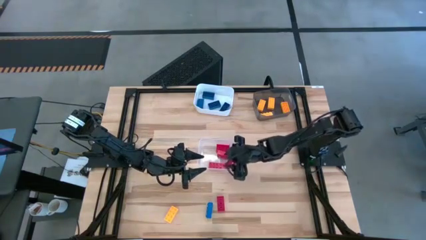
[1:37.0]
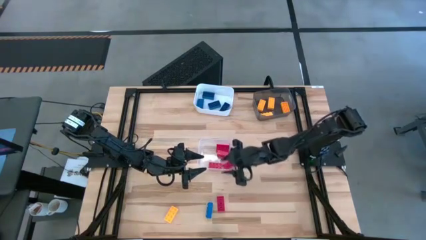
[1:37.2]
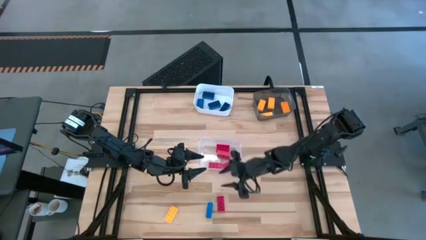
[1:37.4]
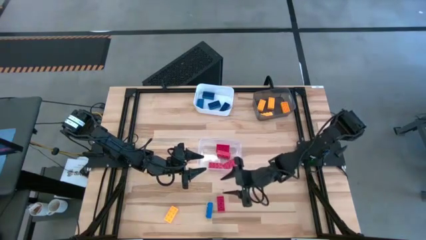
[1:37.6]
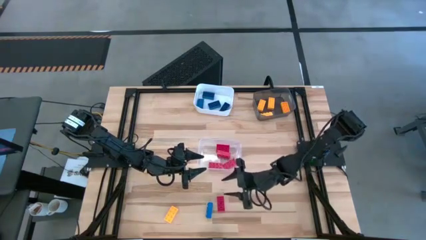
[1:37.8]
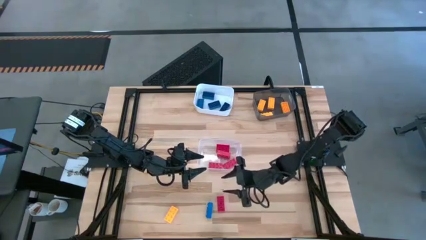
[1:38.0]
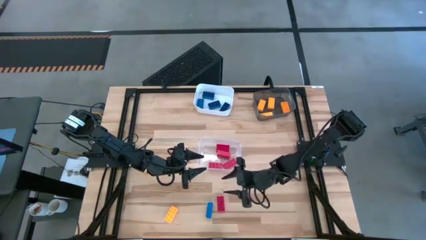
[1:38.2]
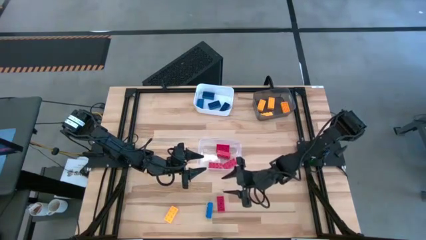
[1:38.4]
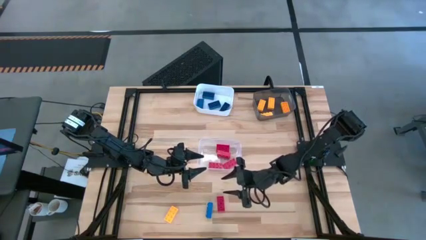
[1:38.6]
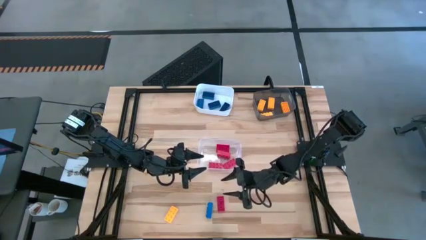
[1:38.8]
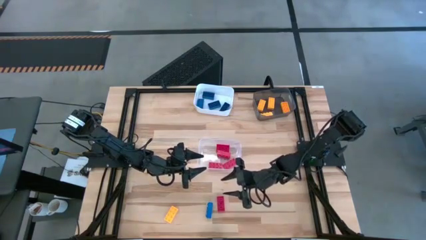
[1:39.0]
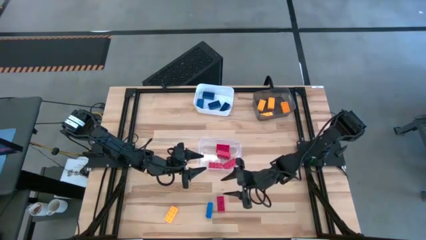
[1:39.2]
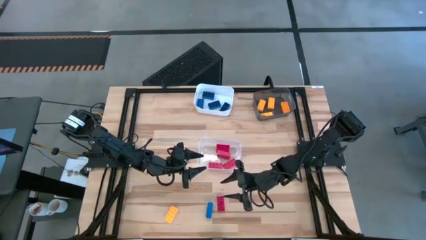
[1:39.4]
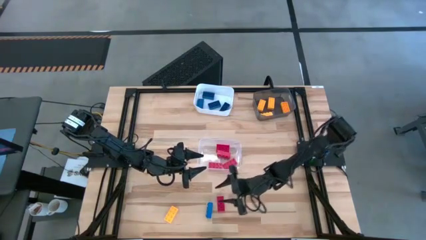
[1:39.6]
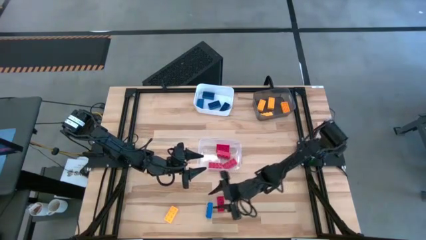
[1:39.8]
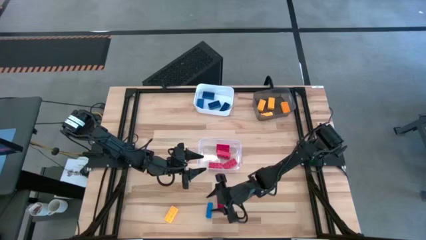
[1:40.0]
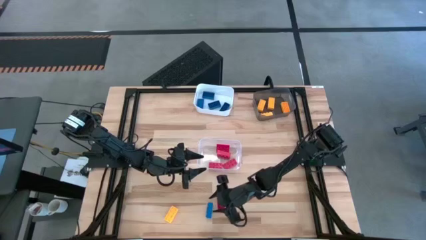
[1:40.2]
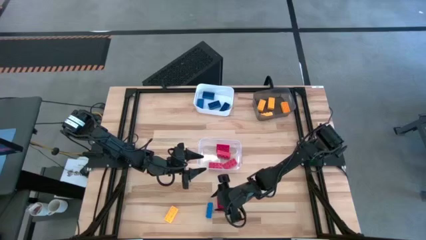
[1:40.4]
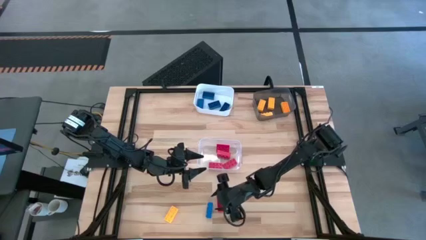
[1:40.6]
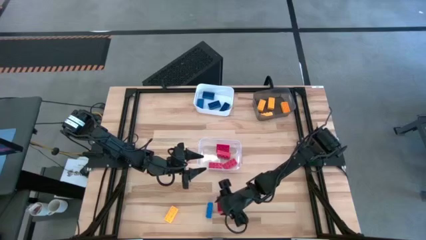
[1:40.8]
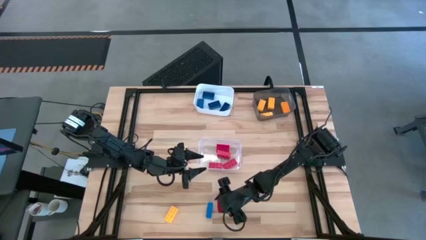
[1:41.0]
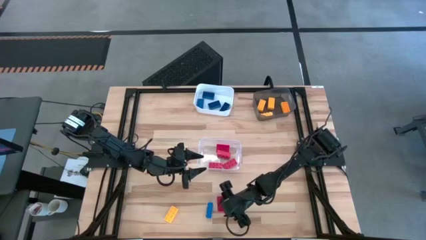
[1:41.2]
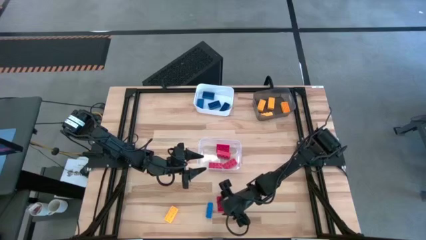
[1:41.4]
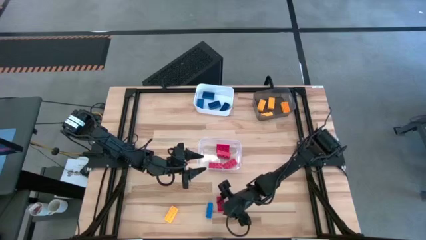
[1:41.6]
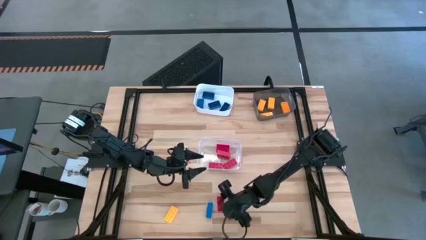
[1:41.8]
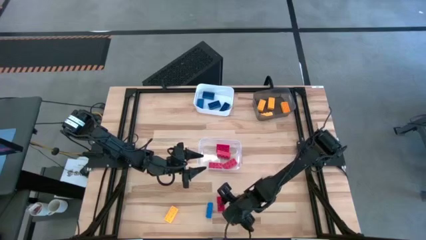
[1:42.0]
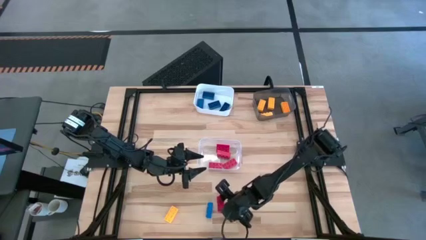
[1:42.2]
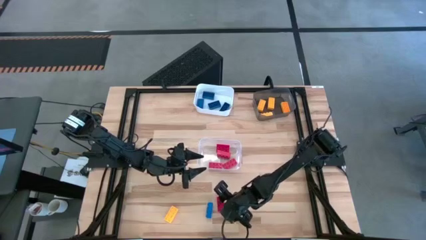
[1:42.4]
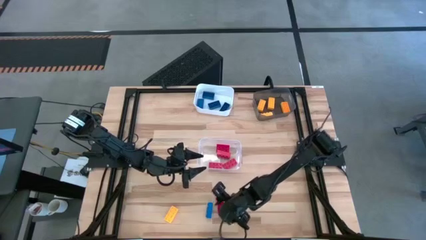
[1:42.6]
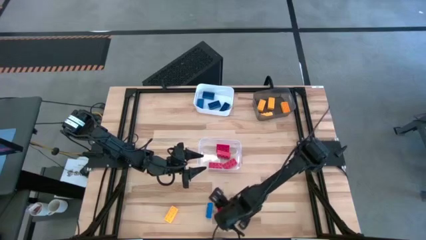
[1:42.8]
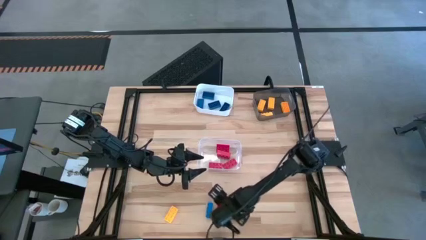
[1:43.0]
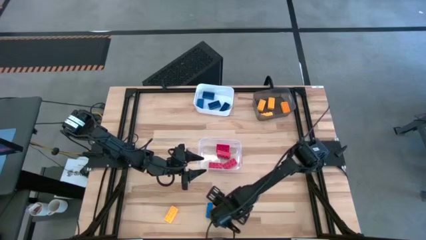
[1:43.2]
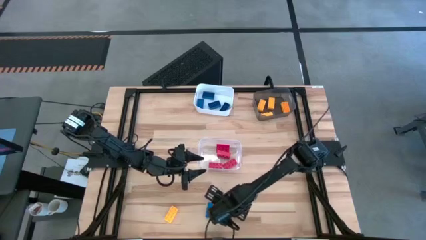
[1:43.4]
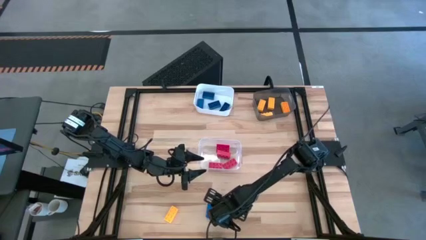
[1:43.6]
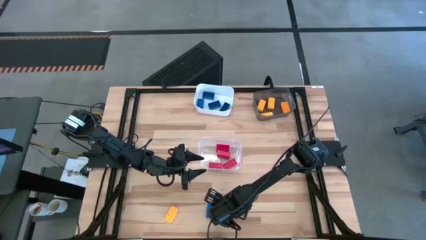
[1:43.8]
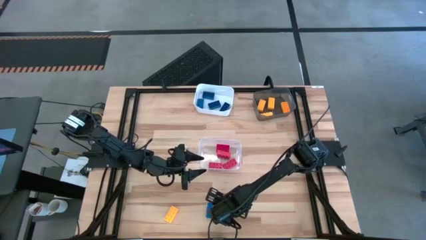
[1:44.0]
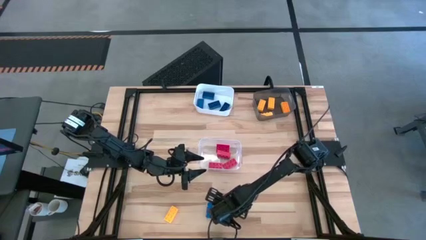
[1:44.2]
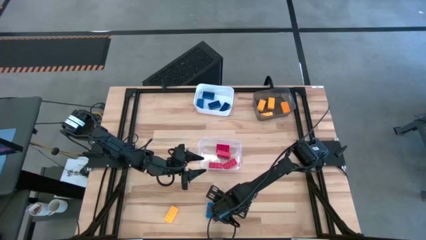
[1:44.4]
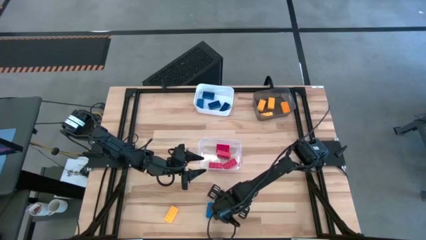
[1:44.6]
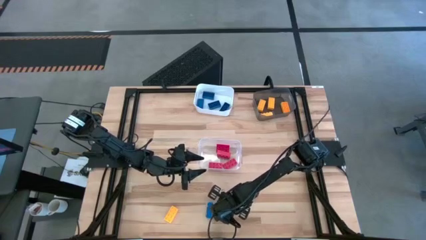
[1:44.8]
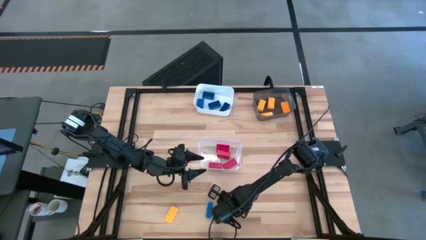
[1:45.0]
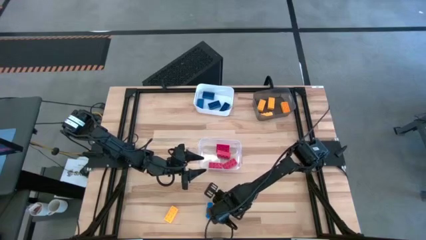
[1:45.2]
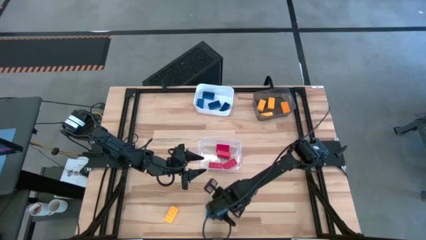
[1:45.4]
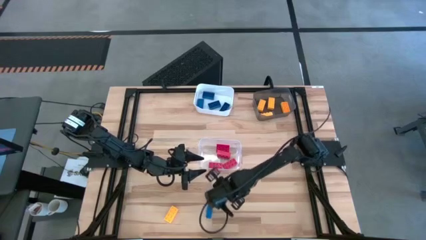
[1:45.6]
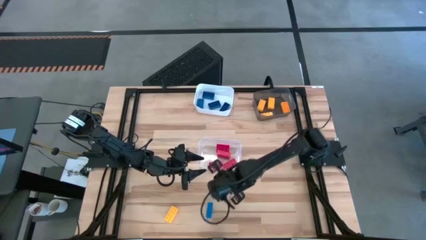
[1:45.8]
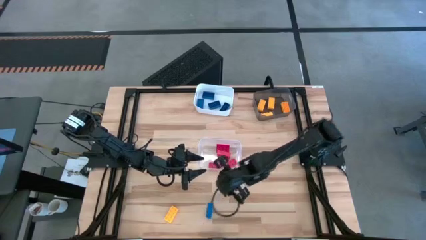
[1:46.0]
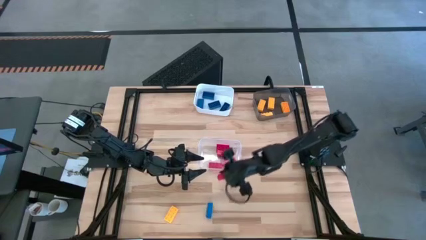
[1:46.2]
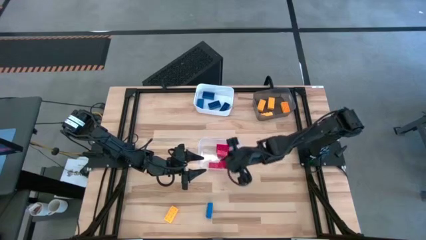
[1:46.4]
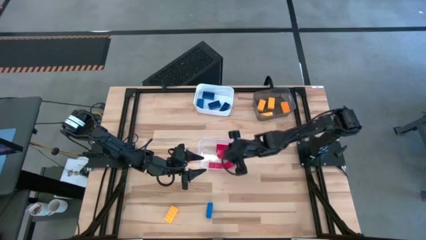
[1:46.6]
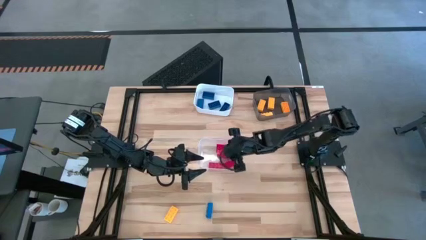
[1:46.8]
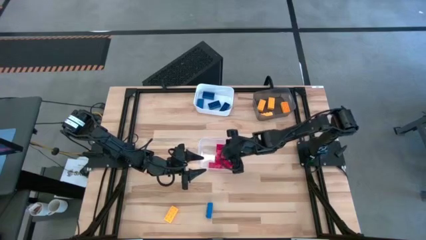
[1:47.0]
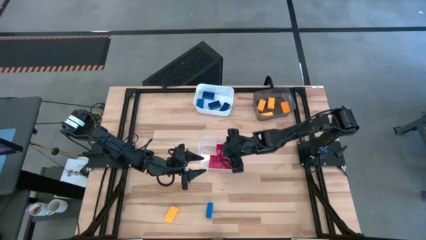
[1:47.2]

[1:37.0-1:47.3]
Task: Sort & place blocks by color
Put the red block into the transparent bin
